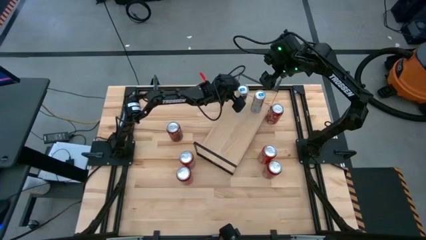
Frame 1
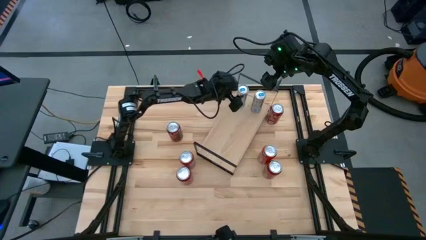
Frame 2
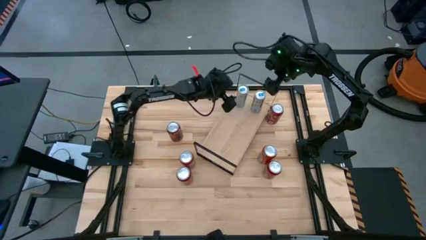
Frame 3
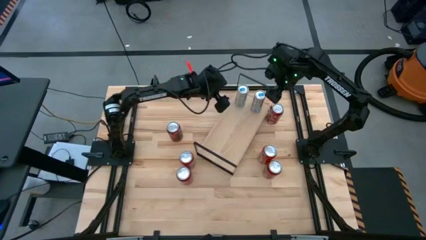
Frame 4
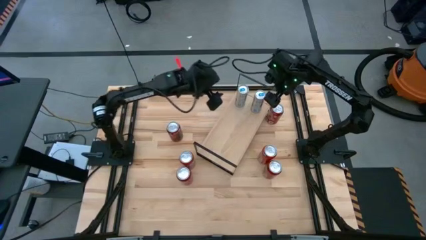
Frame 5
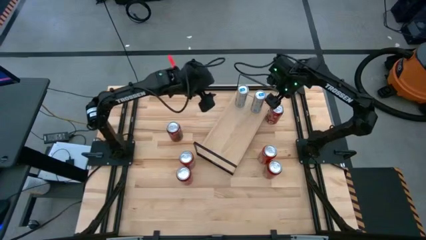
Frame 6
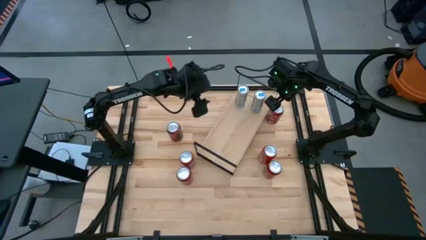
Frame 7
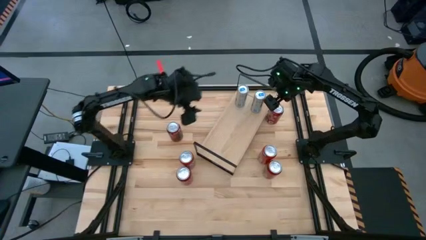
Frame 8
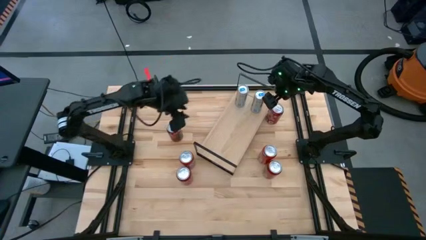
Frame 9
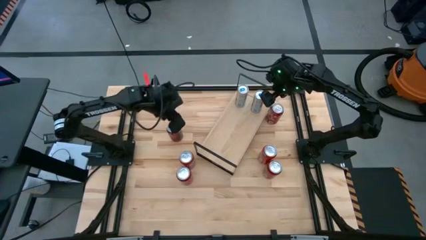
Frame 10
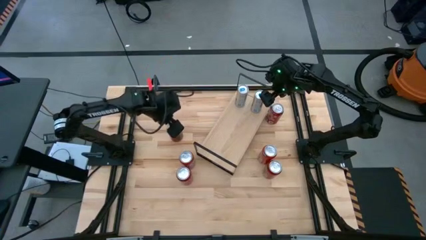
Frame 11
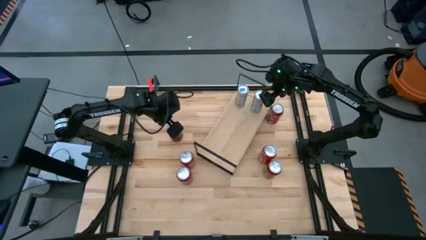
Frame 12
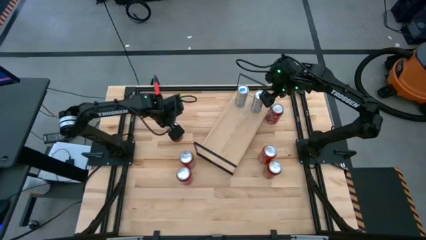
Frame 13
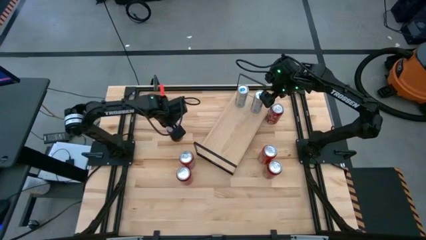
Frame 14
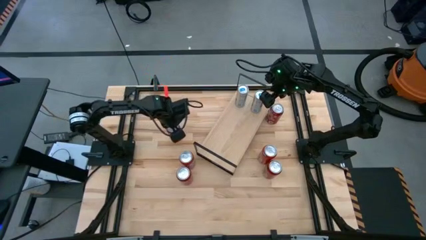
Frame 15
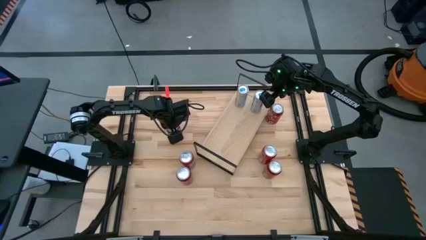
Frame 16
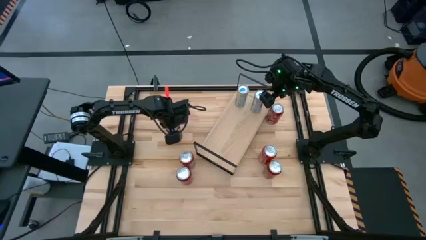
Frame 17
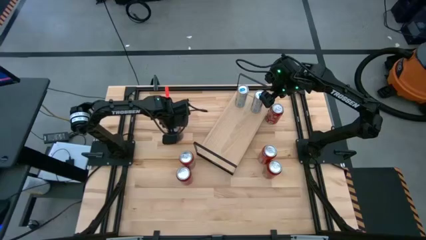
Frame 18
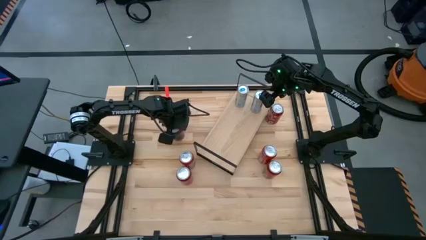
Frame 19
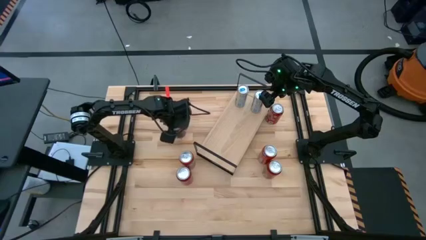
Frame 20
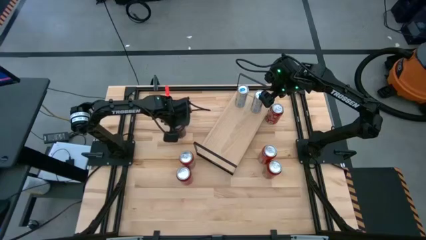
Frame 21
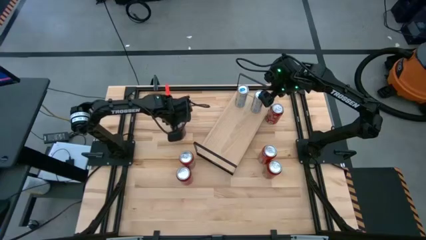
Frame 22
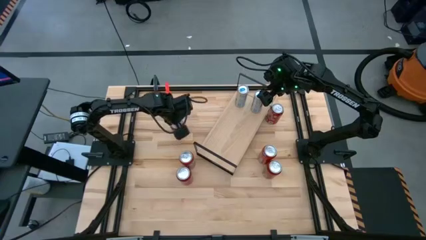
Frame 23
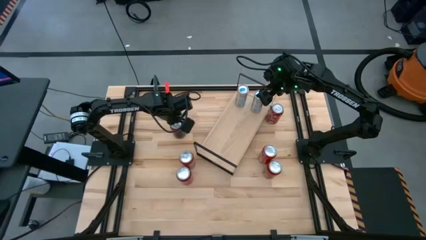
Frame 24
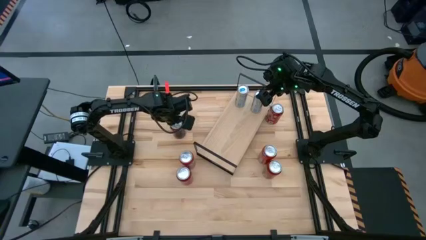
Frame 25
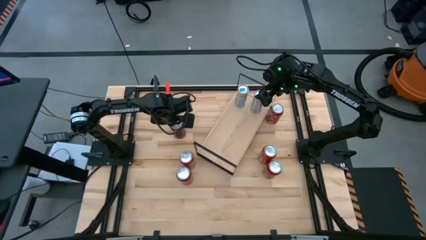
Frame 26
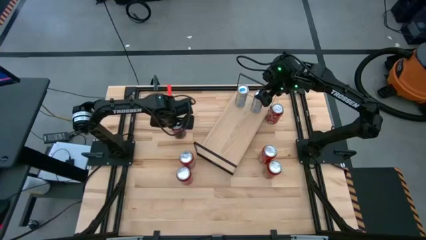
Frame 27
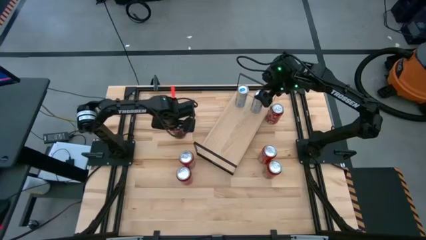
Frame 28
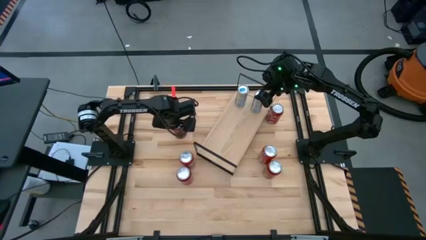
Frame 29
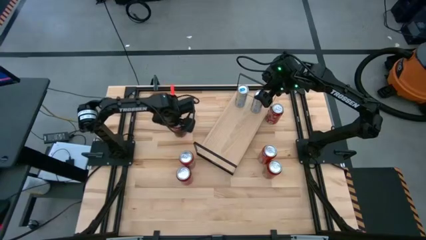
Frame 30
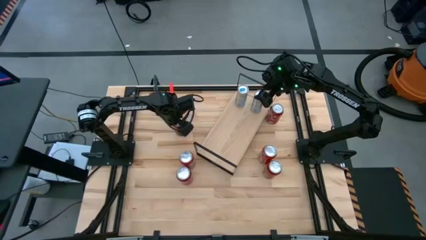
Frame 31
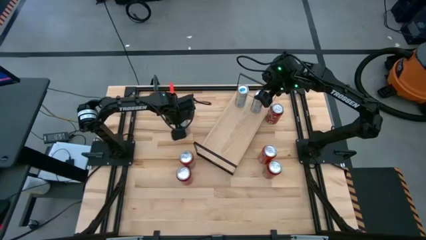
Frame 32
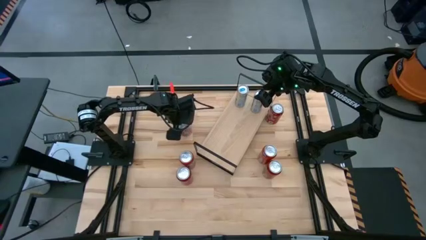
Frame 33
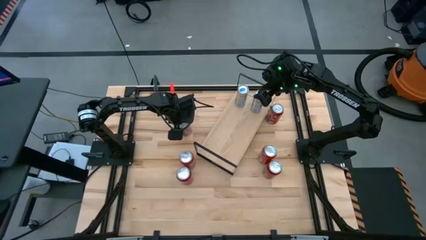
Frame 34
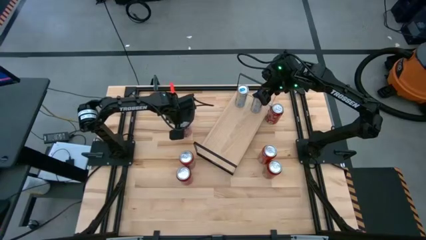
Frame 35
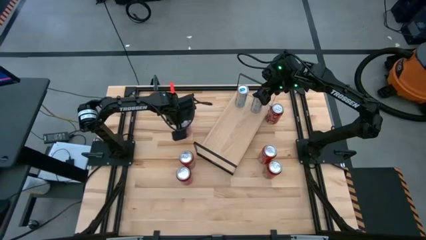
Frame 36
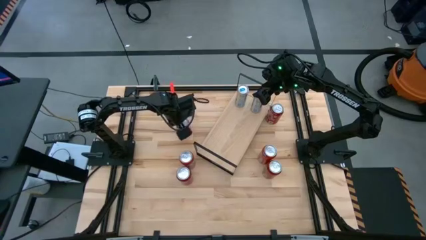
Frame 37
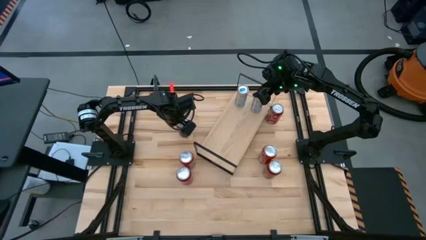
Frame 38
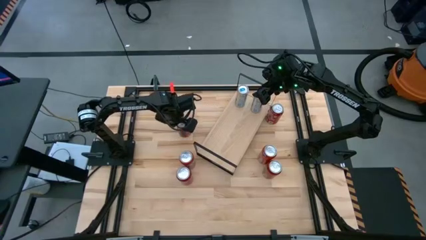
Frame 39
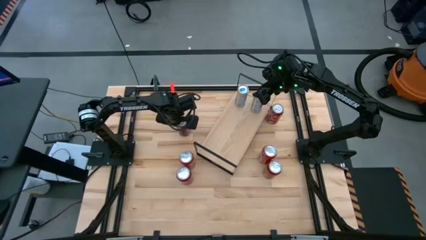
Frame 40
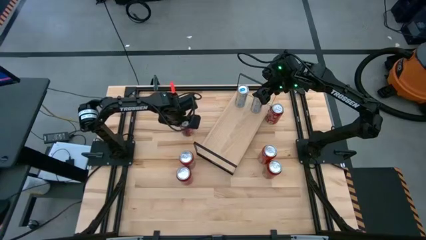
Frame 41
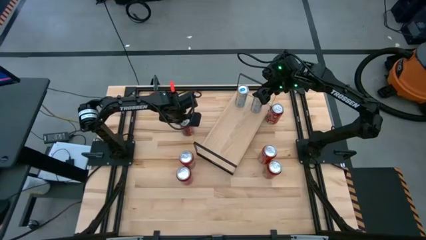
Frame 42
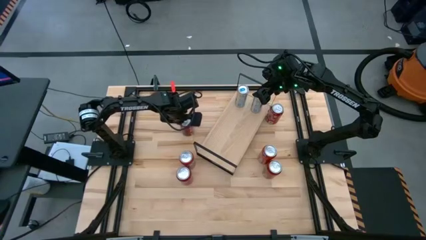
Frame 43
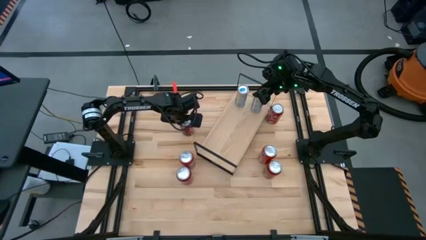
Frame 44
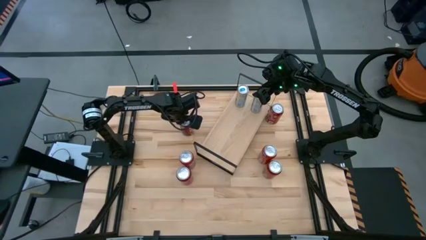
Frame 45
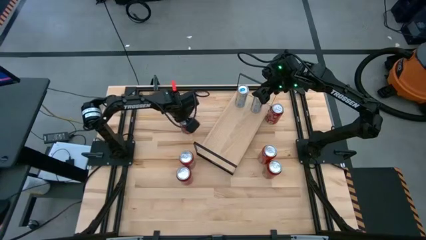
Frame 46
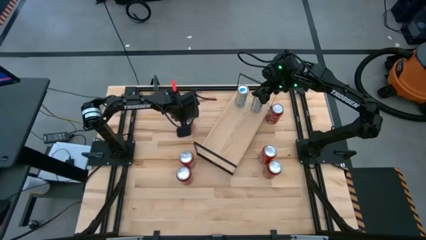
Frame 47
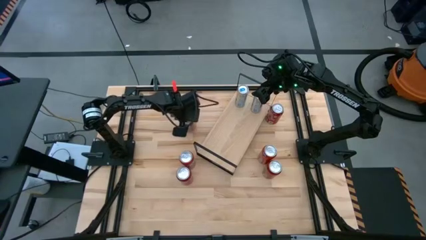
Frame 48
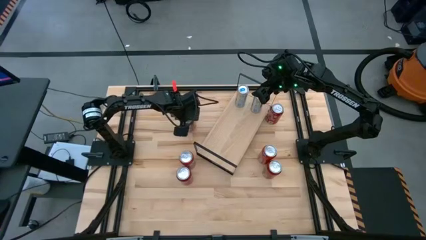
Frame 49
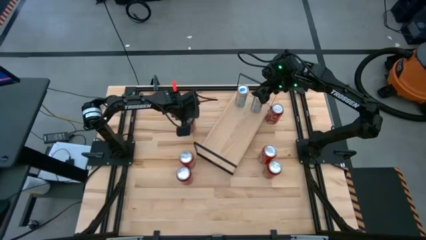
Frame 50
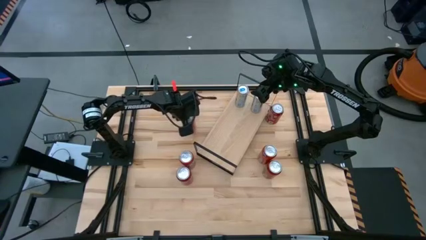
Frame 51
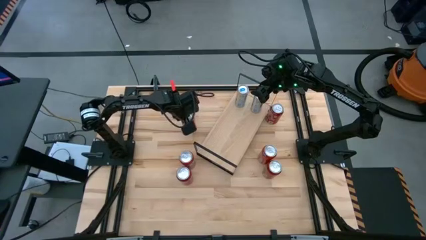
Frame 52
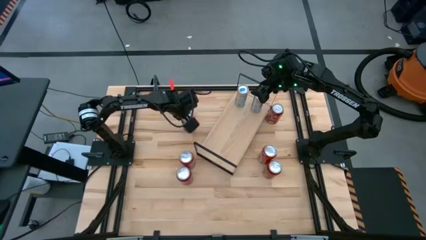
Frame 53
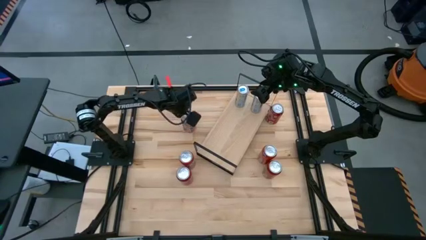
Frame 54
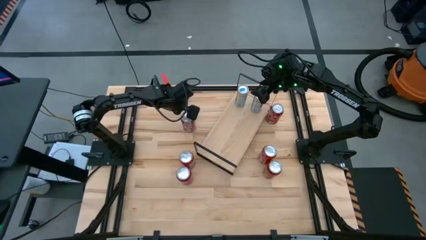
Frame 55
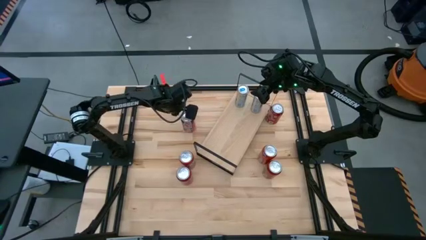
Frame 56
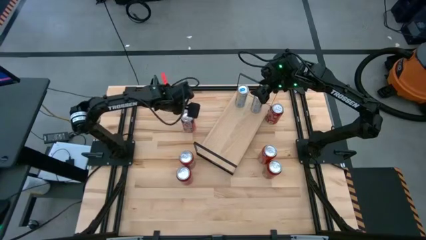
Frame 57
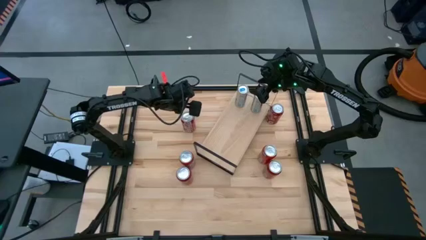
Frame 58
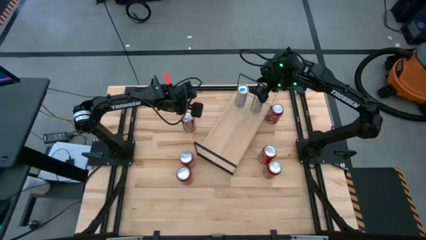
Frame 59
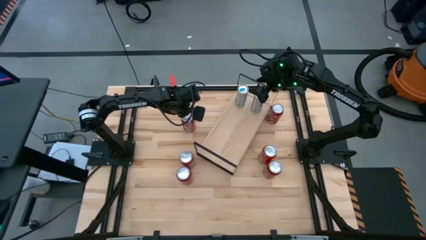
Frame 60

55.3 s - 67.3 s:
Task: Place canned beverage on shelf
Put the left red-white soda can on the shelf

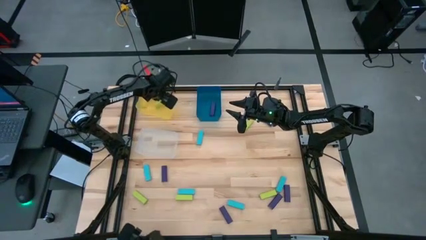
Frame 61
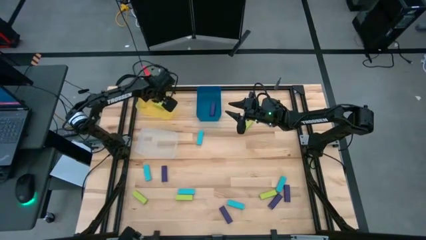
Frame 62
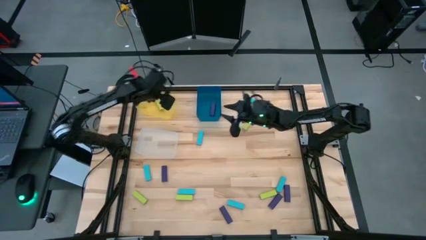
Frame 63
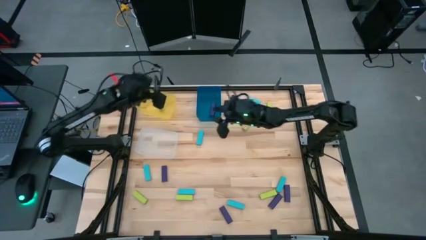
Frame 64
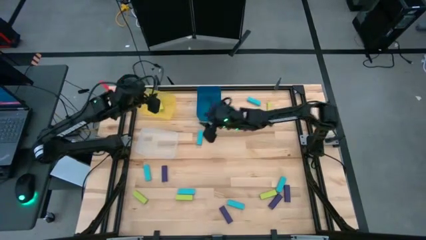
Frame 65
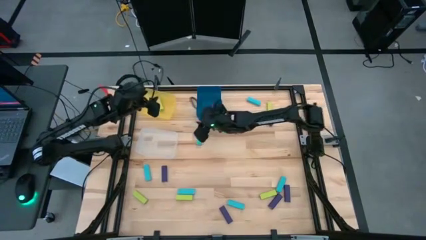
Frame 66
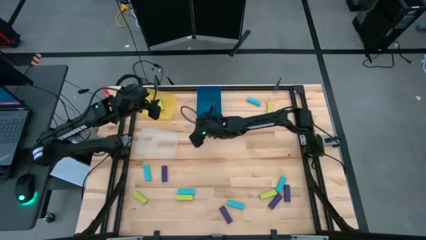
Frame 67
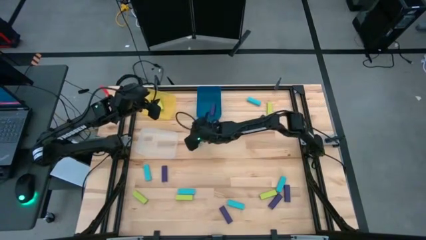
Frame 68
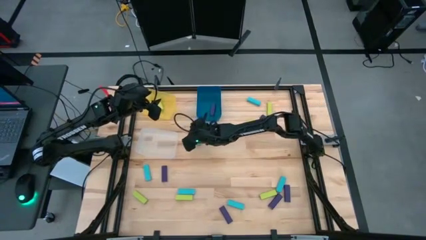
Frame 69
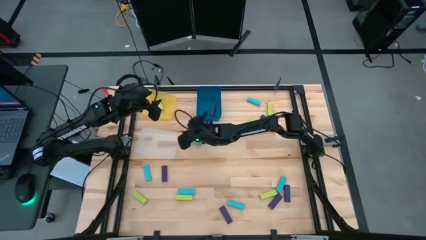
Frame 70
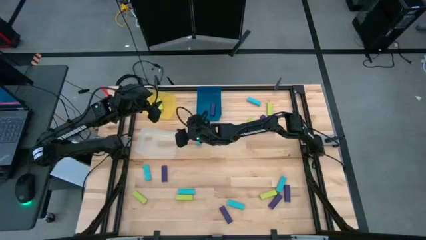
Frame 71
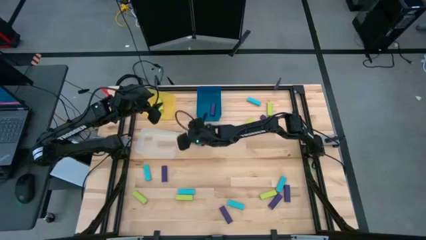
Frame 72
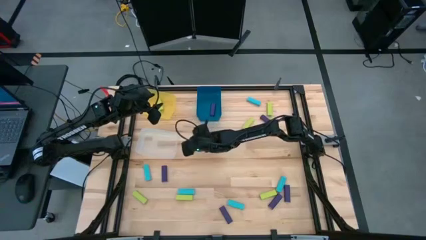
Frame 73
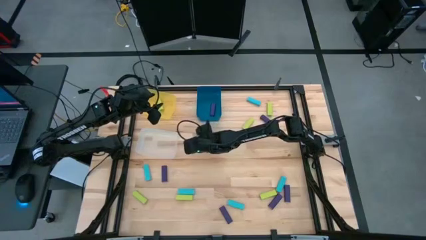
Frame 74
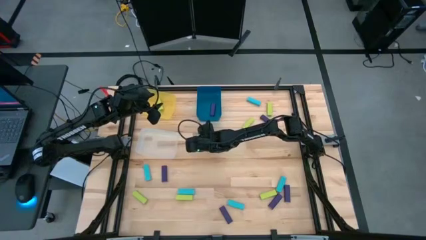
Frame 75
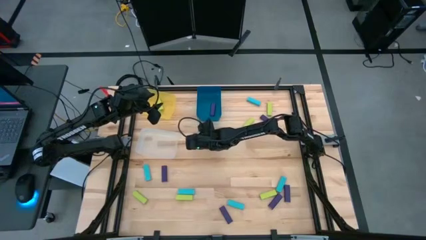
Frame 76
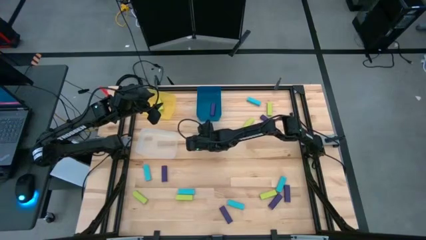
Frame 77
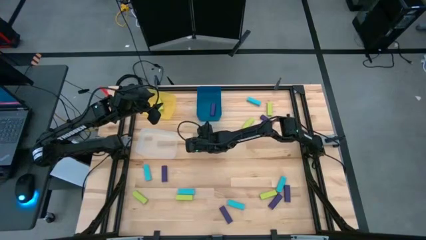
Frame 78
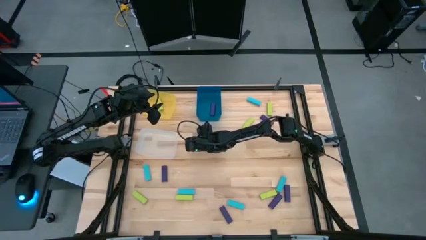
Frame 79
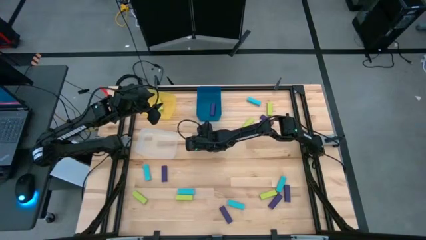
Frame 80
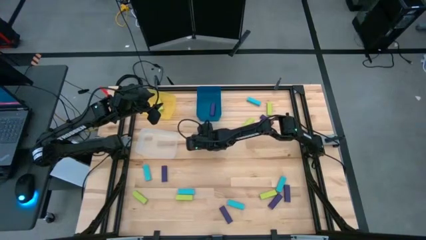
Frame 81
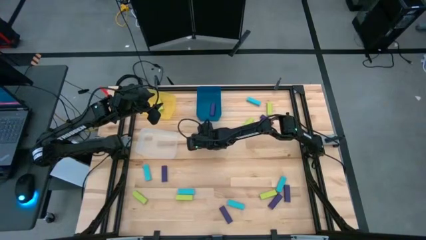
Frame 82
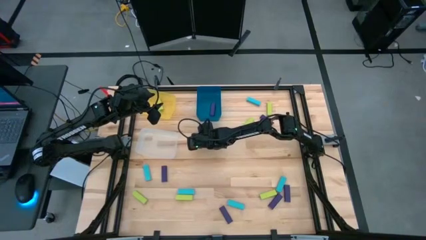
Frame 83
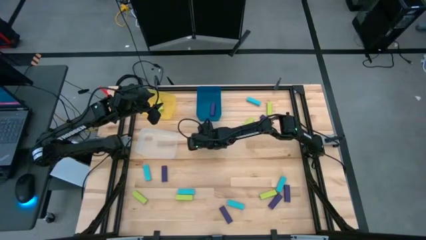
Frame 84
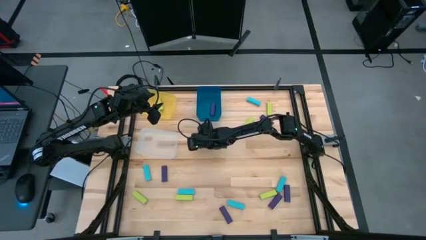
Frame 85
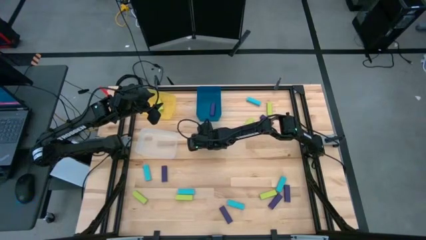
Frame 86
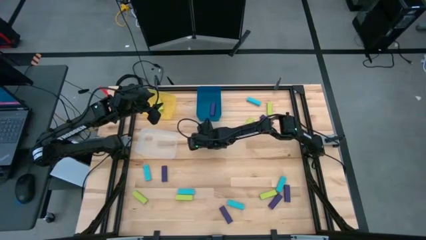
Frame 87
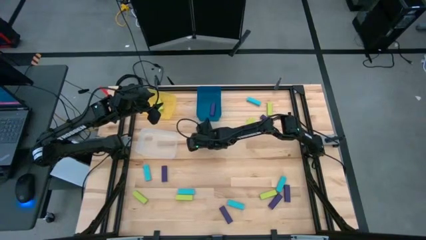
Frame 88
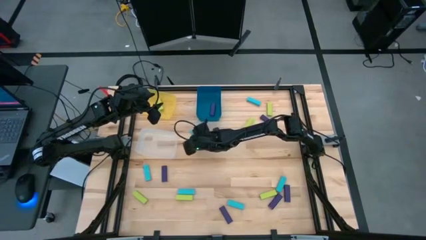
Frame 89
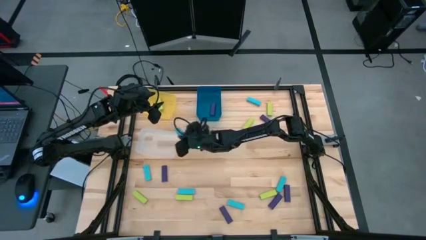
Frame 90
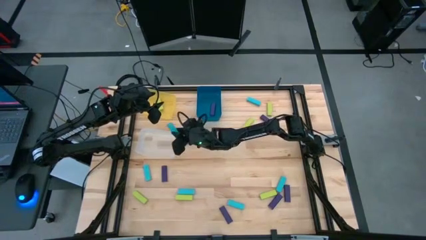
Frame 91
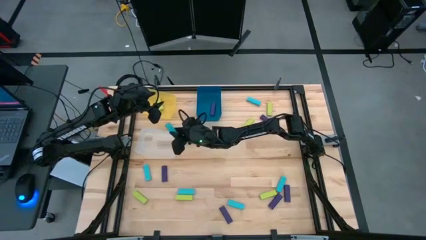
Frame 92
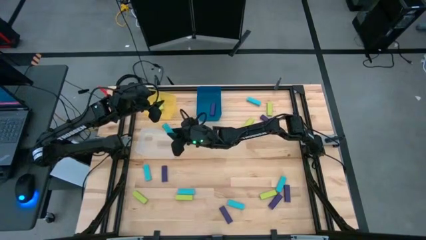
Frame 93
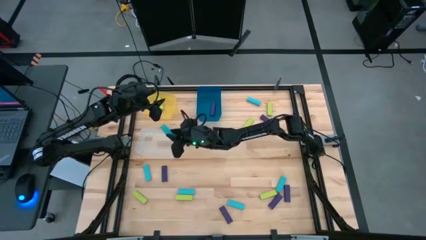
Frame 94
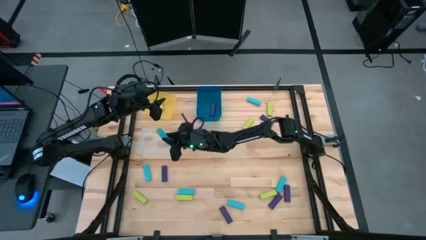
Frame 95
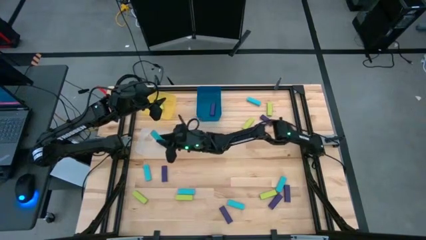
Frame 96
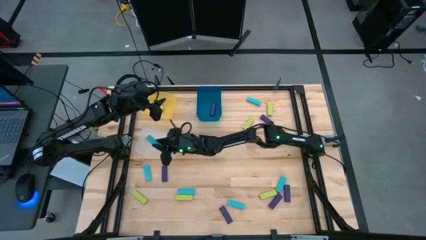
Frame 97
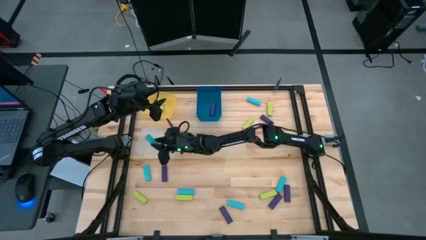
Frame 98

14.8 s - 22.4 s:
Task: Sort blocks
Put the blue block into the white bin
